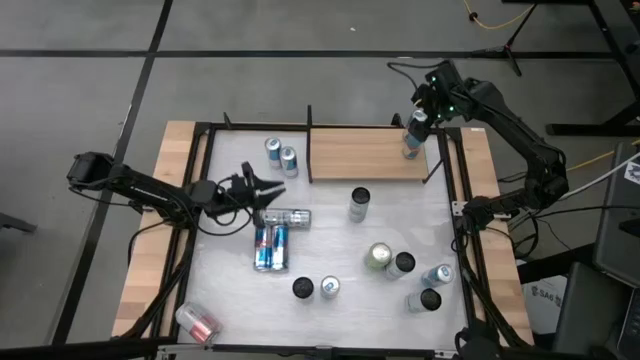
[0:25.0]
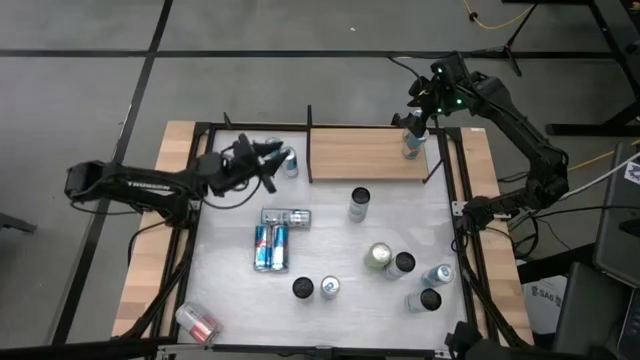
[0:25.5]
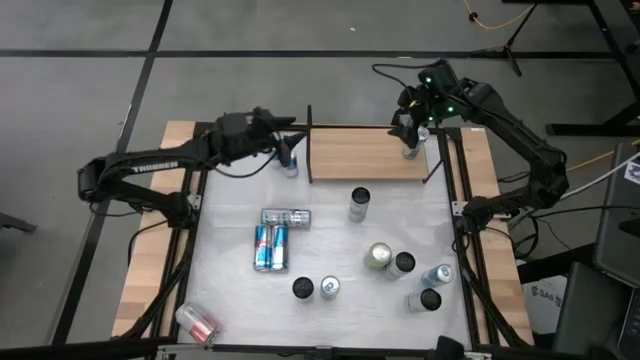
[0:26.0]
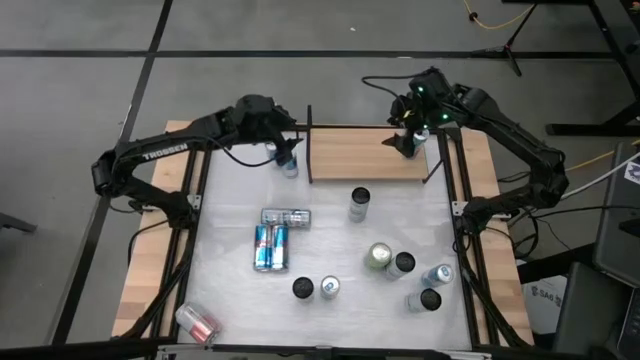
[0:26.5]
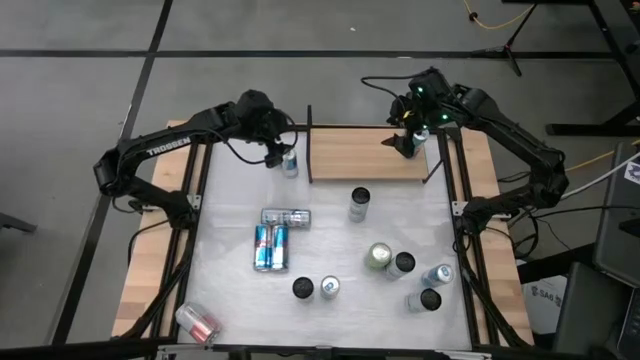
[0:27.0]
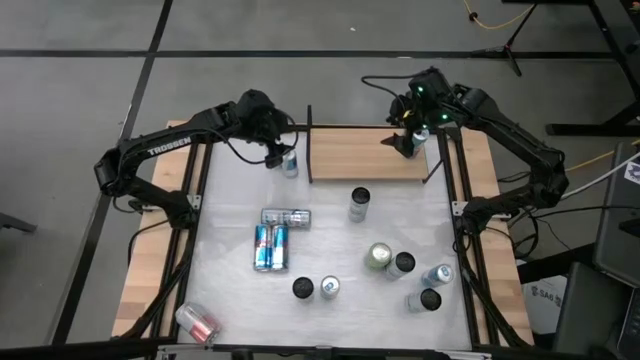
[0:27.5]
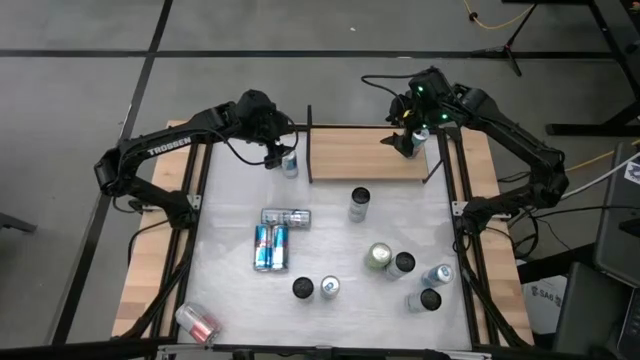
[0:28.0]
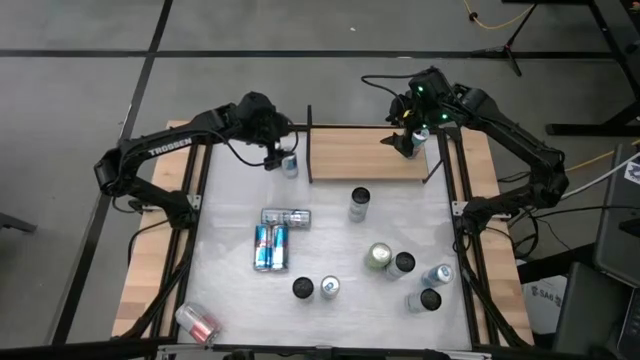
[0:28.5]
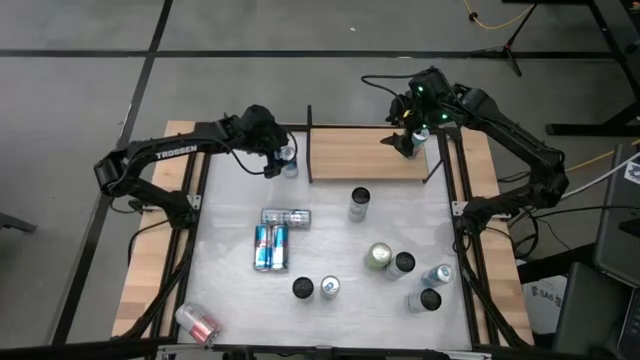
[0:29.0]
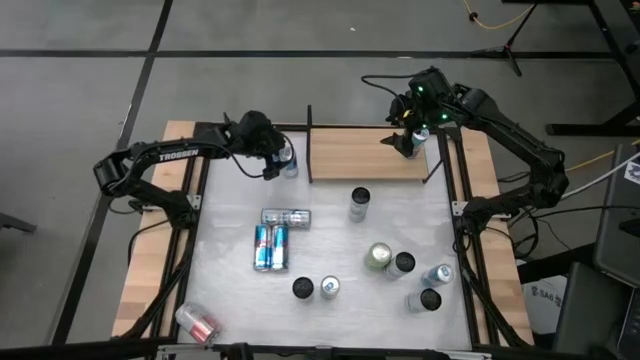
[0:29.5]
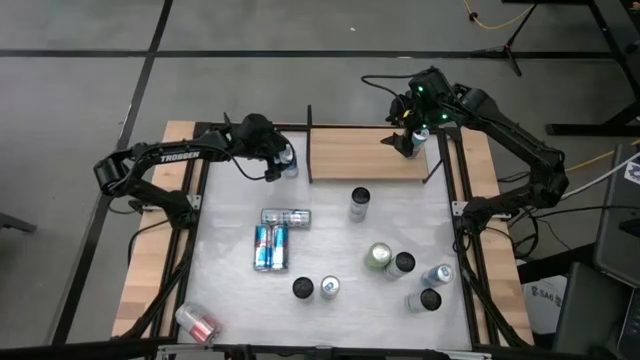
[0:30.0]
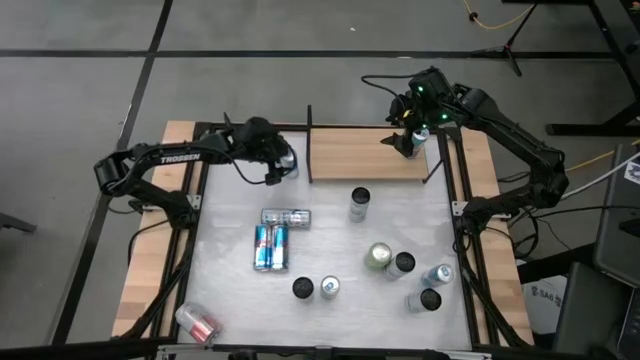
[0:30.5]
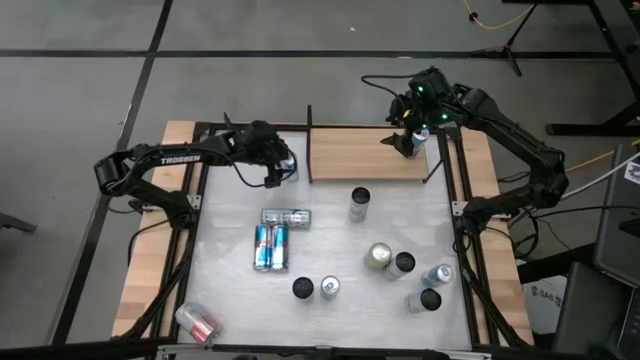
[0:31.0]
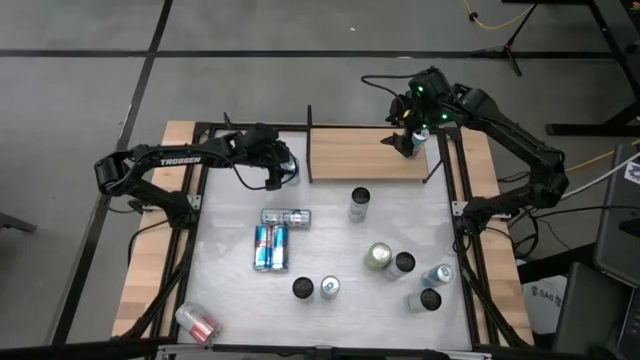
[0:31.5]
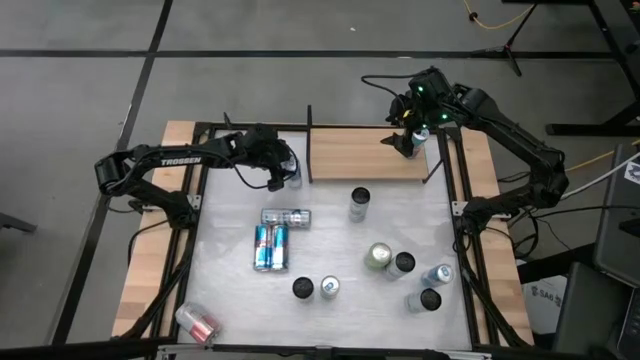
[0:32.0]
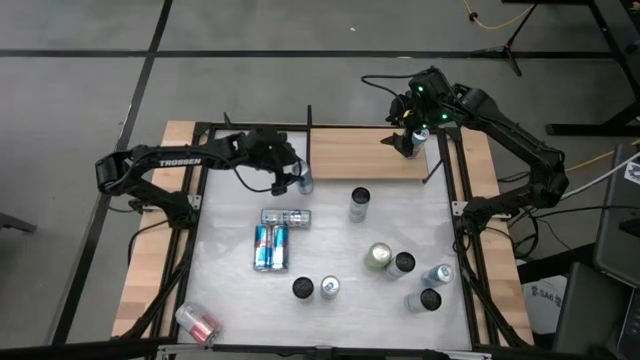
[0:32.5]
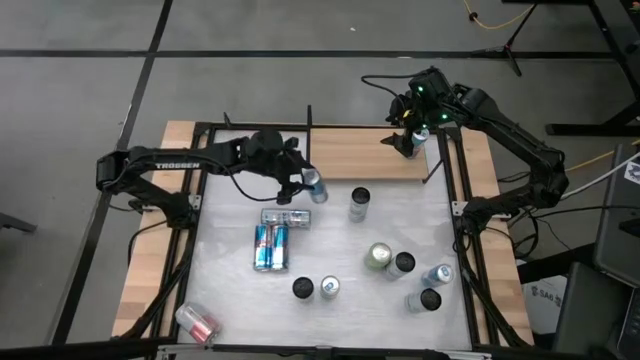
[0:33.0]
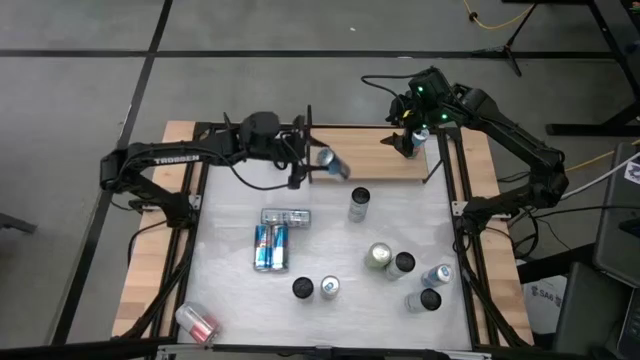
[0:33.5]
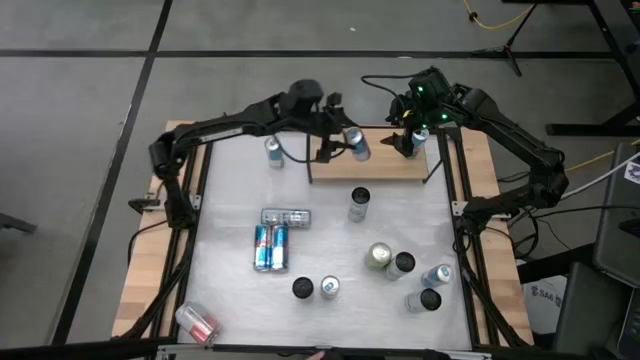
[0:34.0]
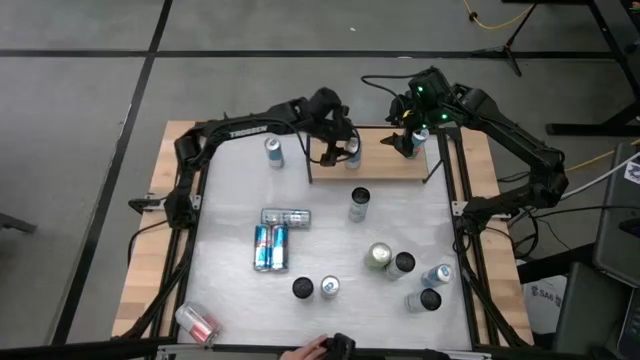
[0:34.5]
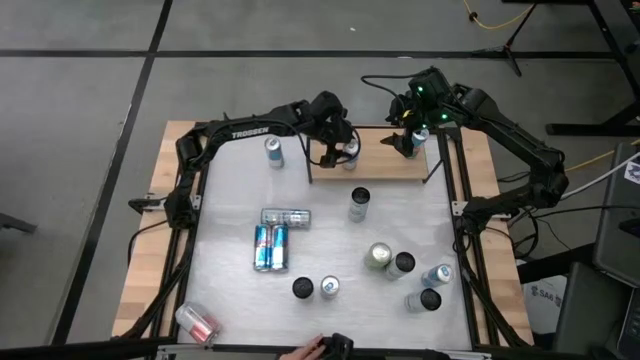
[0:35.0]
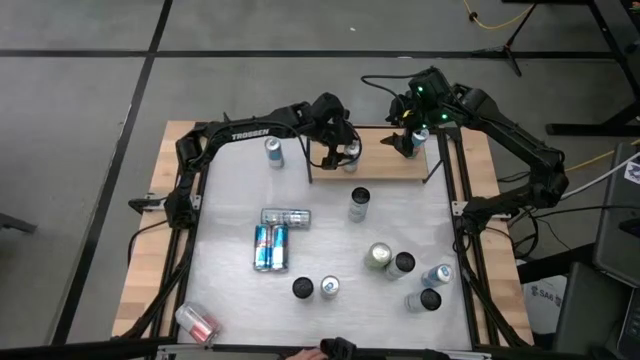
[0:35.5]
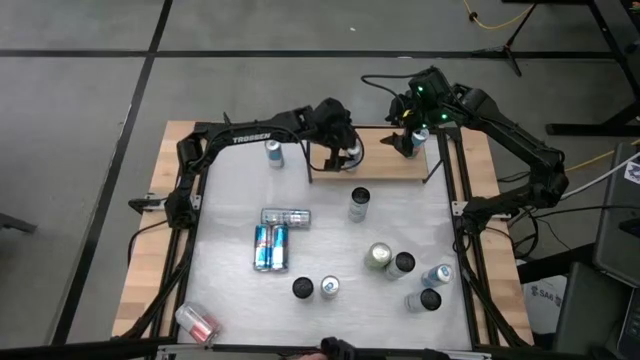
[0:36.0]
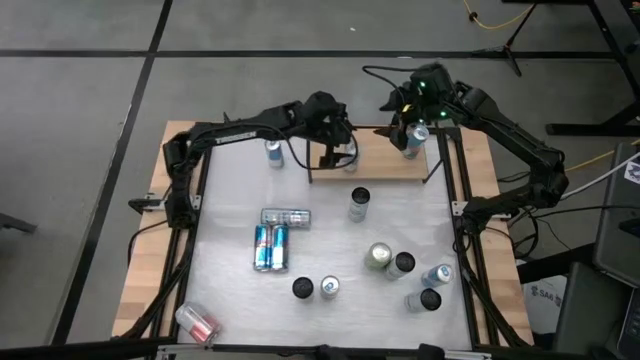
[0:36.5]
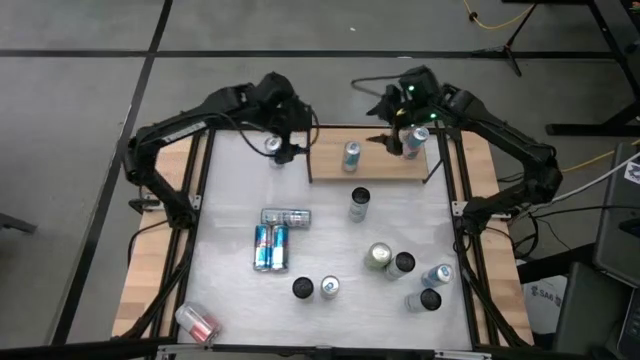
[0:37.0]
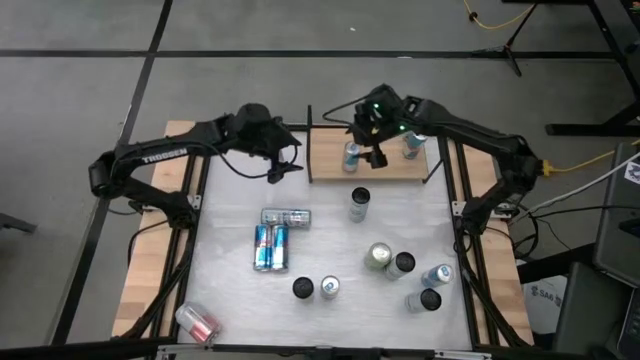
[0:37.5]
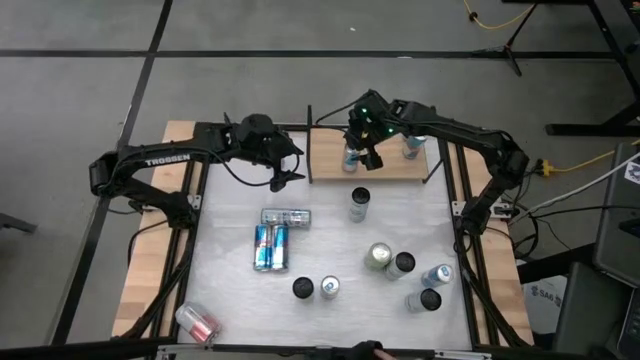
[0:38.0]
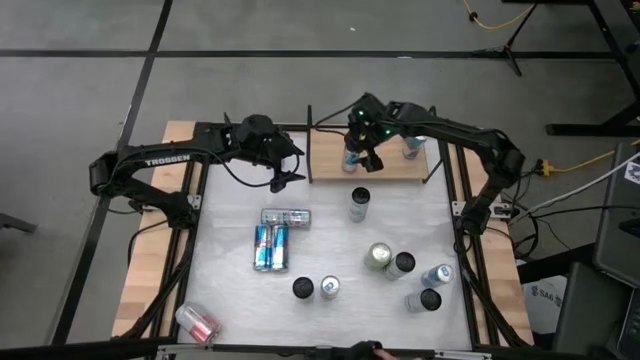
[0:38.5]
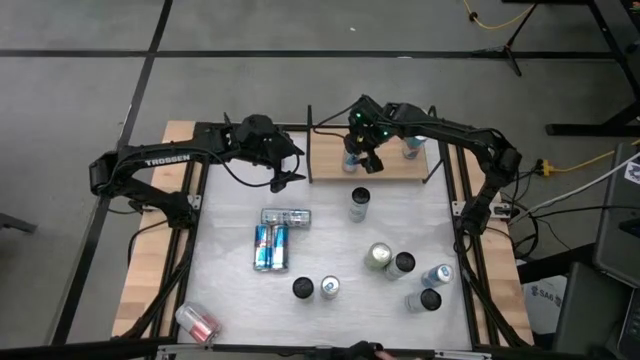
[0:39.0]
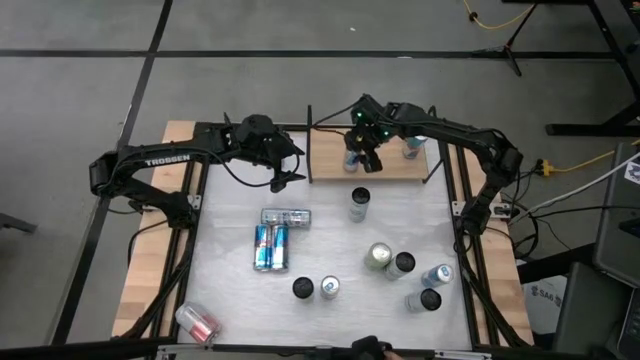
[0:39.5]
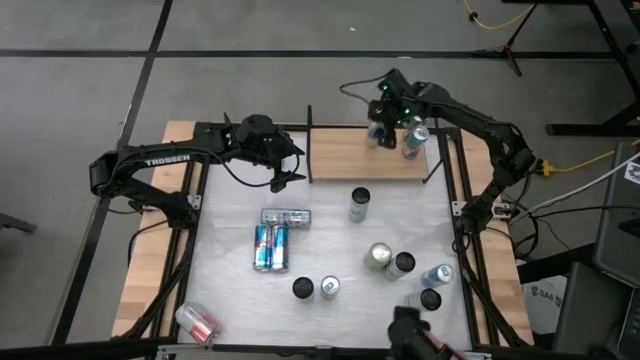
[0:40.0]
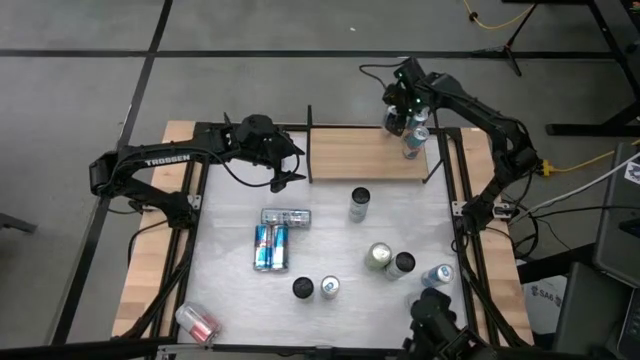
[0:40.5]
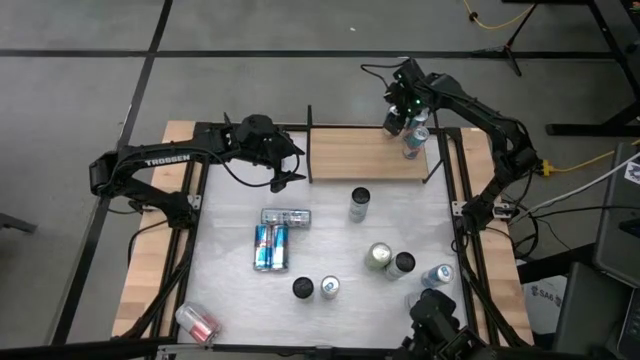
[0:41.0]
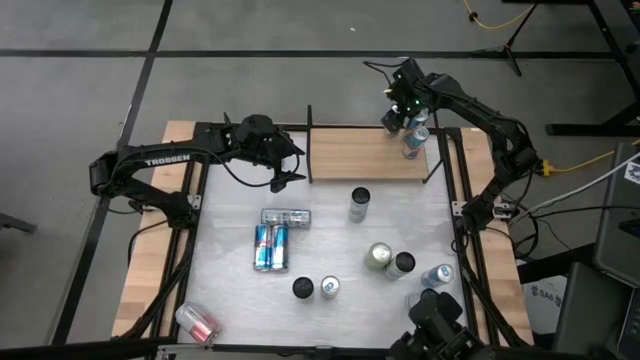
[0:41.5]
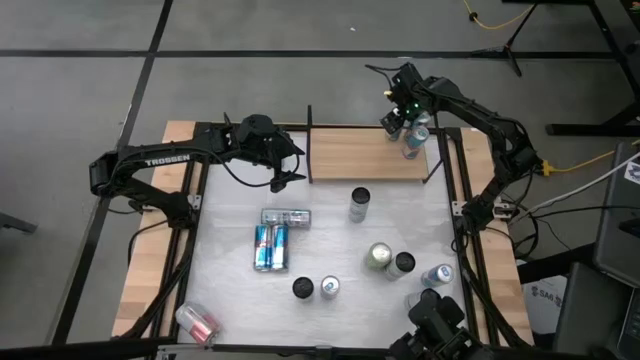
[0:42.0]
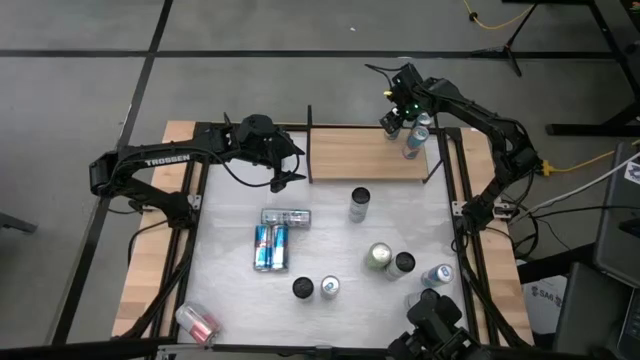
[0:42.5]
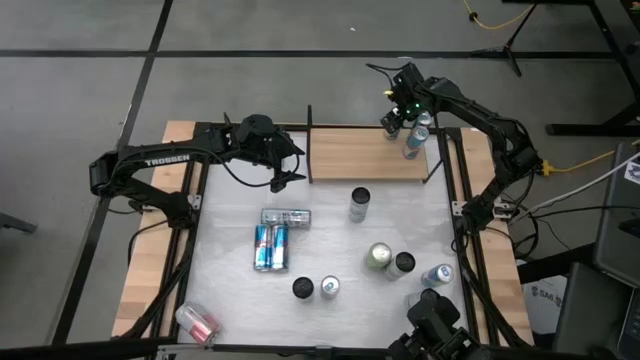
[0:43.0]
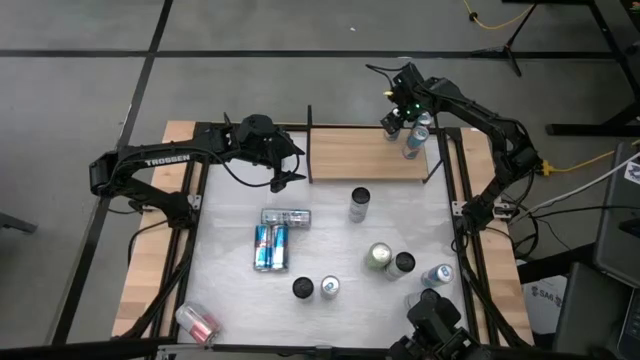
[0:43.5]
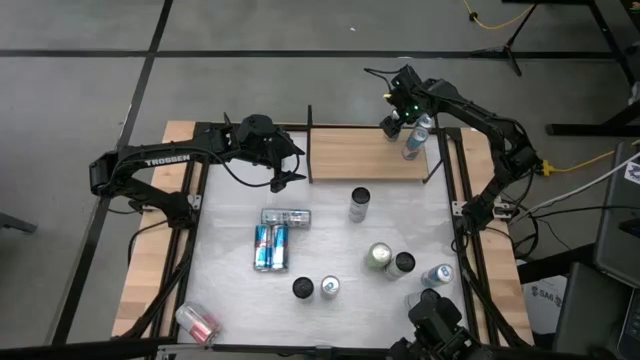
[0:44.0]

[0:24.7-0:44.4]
Task: Place canned beverage on shelf
Put the blue soda can on the shelf aligned with the other blue soda cans

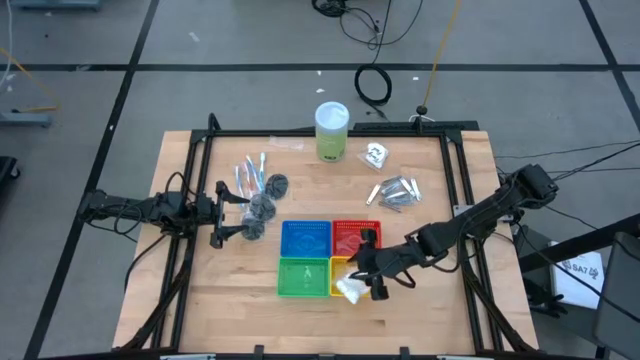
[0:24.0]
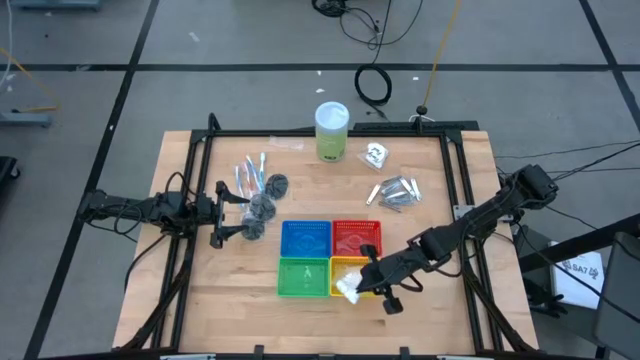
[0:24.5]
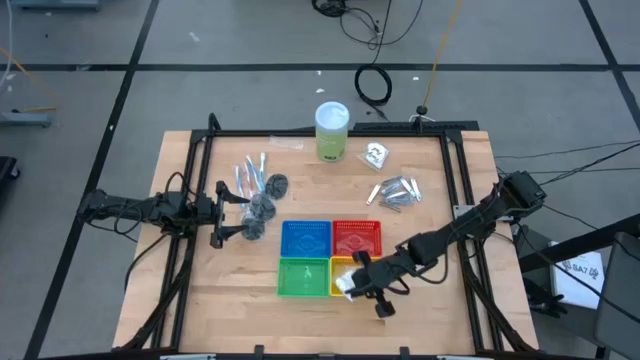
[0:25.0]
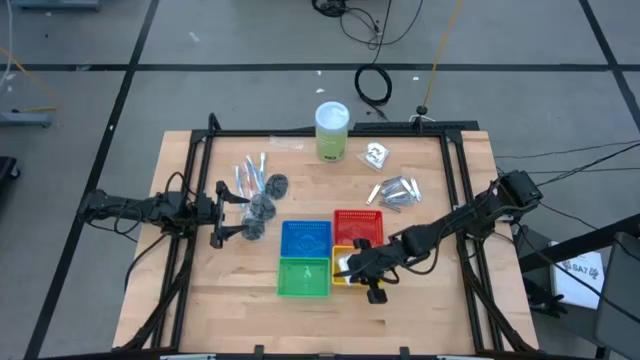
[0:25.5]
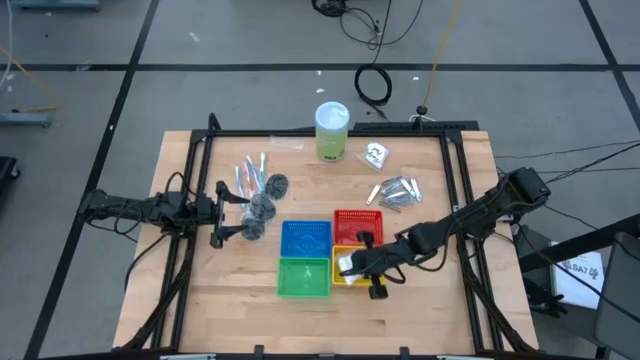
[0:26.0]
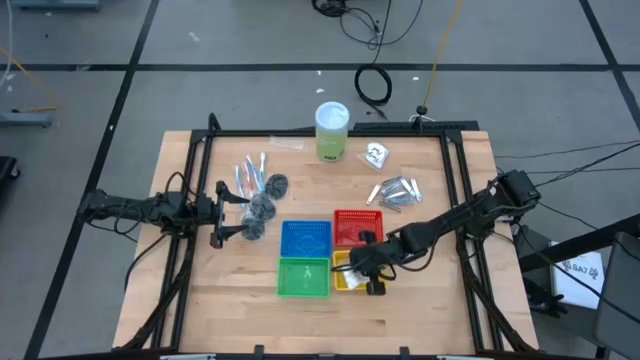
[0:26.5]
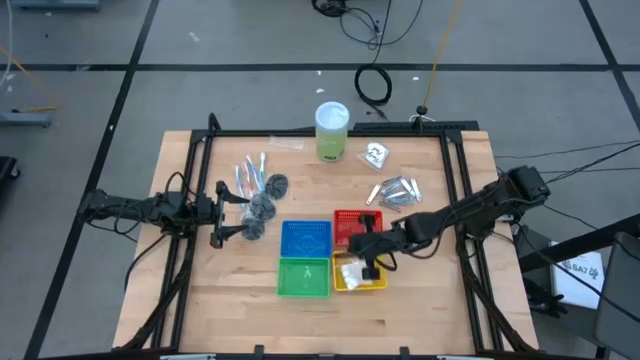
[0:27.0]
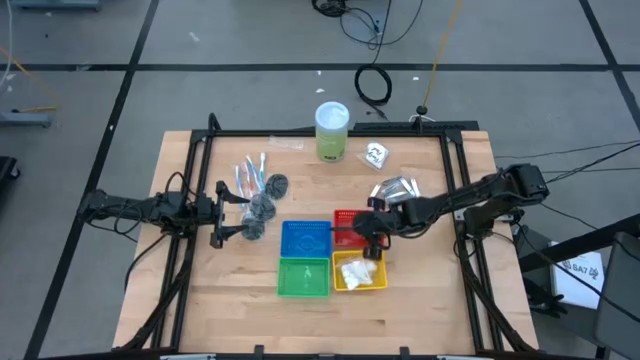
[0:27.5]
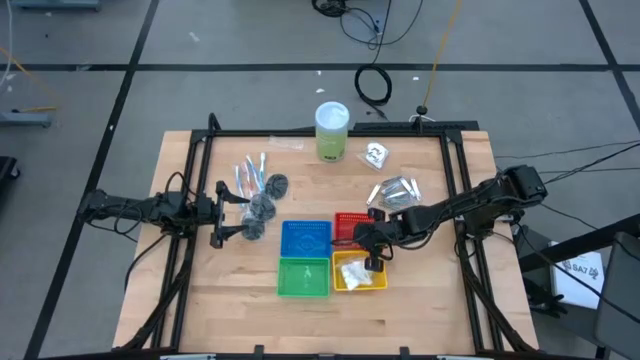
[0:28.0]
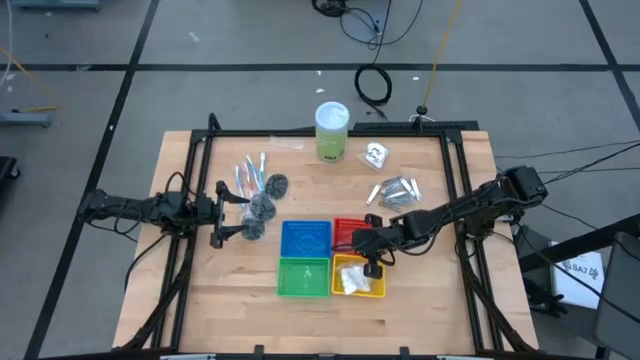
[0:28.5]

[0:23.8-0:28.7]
Task: Pick & Place Travel size toiletries
Adjust the red basket
